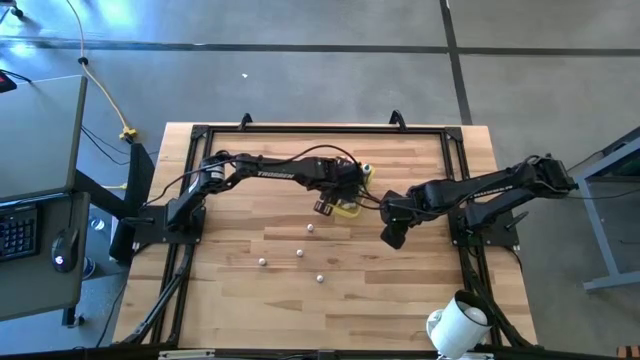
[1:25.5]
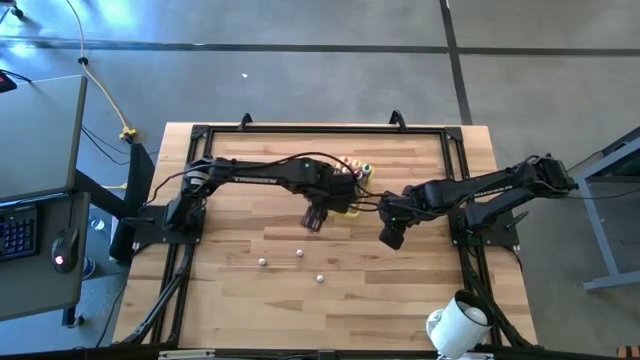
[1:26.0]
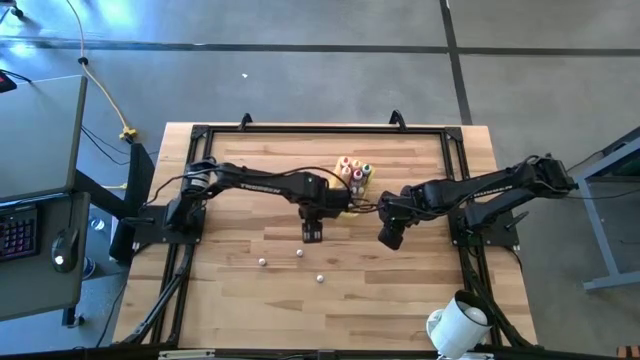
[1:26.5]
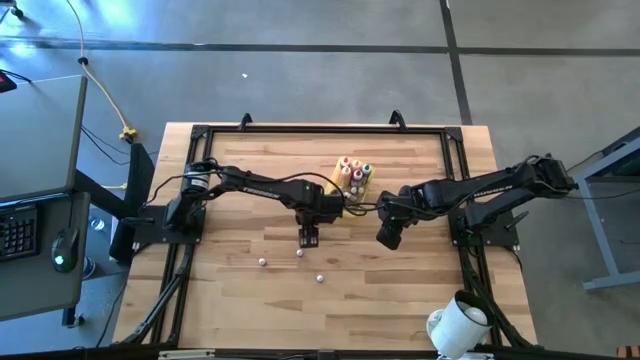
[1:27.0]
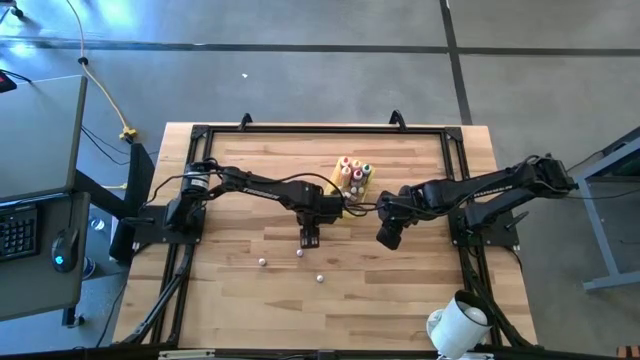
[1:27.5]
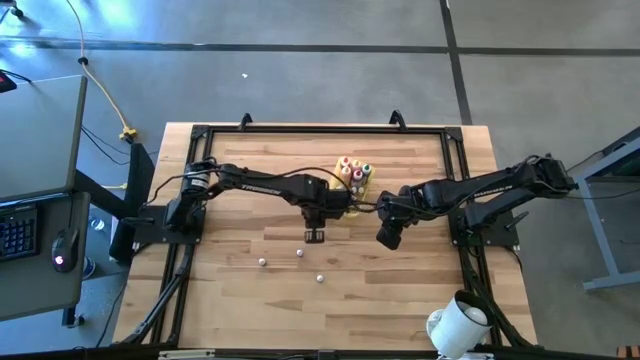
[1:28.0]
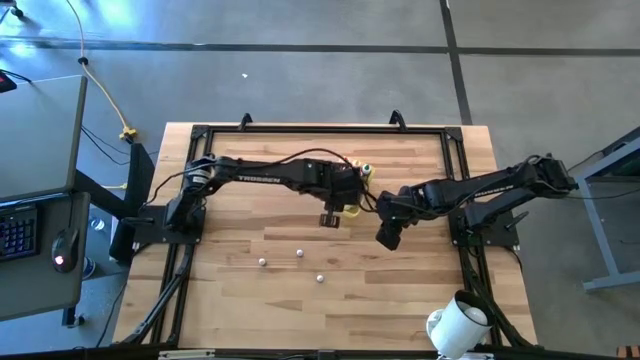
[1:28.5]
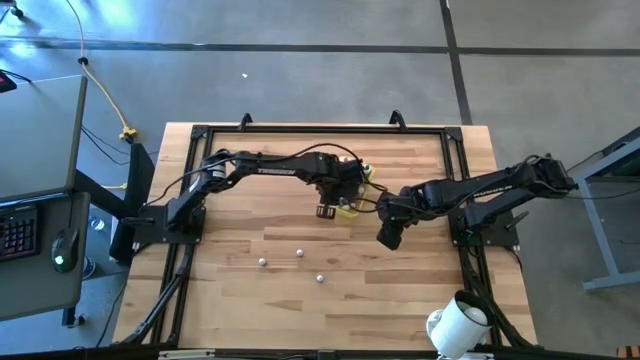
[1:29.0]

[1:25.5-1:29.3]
Task: Pick & Place food coloring
Put the small red food coloring bottle into the bin

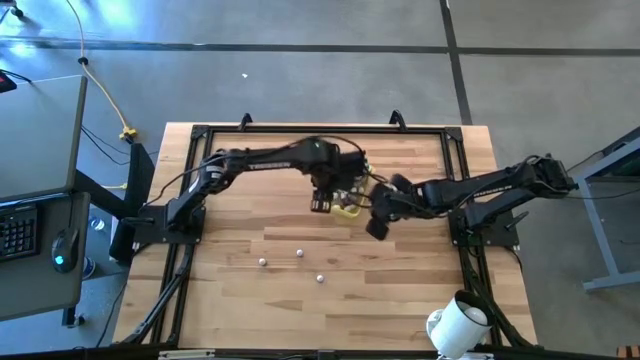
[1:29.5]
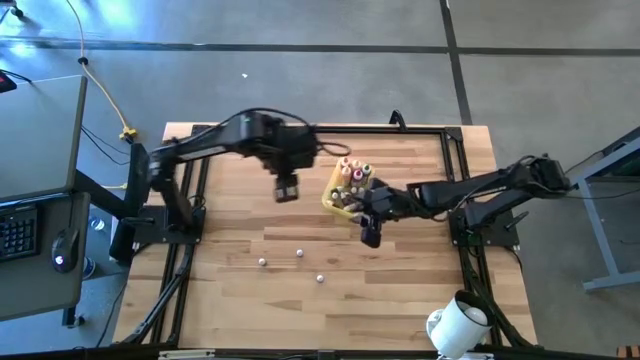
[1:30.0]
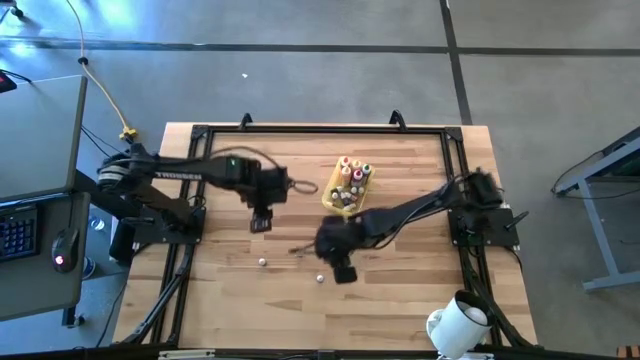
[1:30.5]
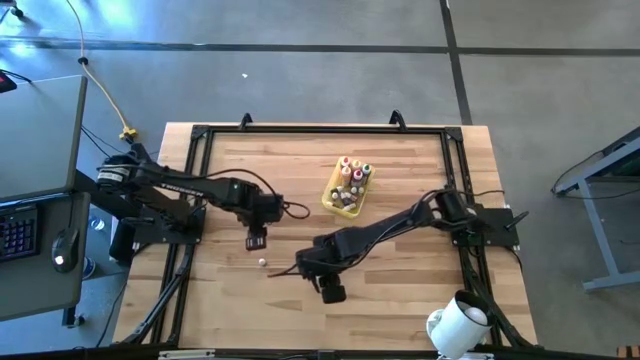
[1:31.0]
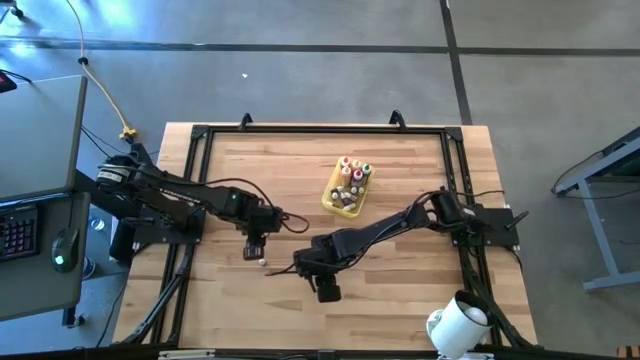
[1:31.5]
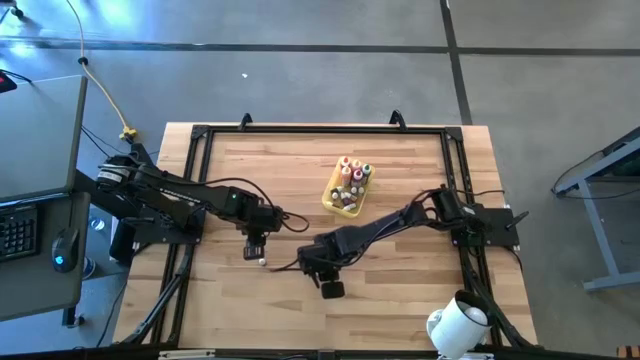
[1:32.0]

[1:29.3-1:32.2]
Put the small blue food coloring bottle into the bin

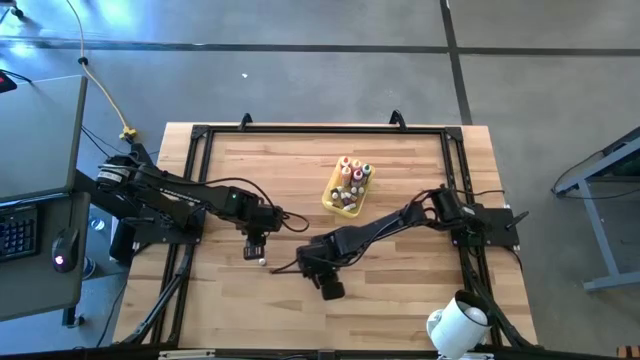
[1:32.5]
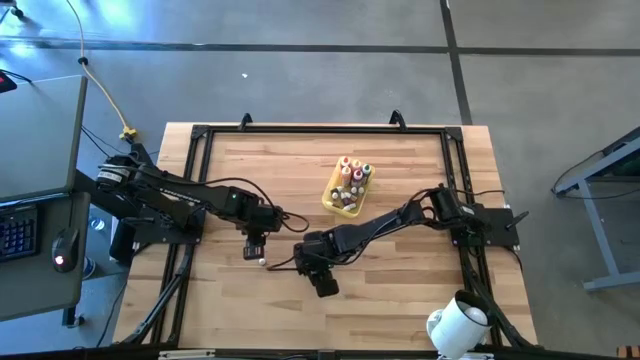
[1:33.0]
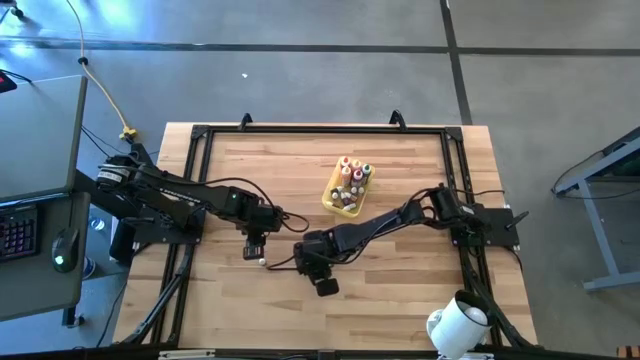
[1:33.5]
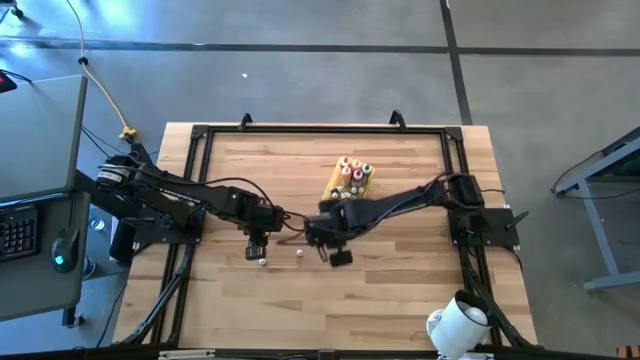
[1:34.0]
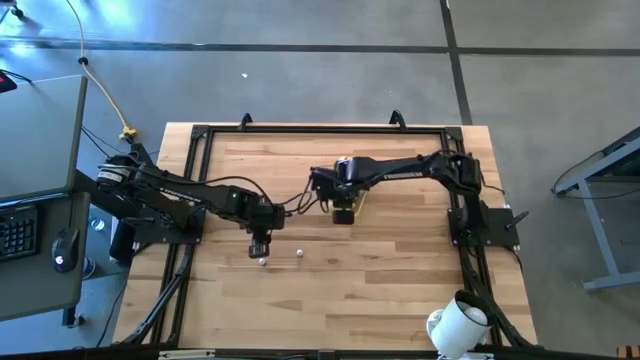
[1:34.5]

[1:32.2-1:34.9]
Put the small blue food coloring bottle into the bin

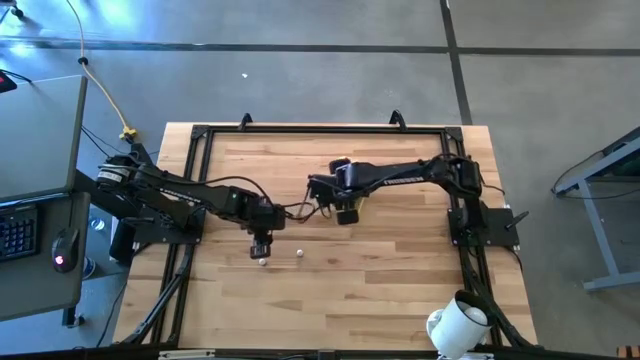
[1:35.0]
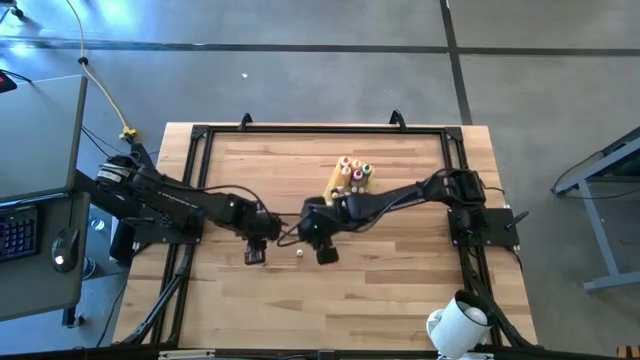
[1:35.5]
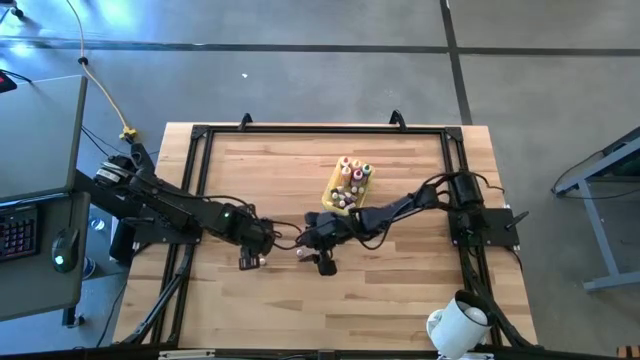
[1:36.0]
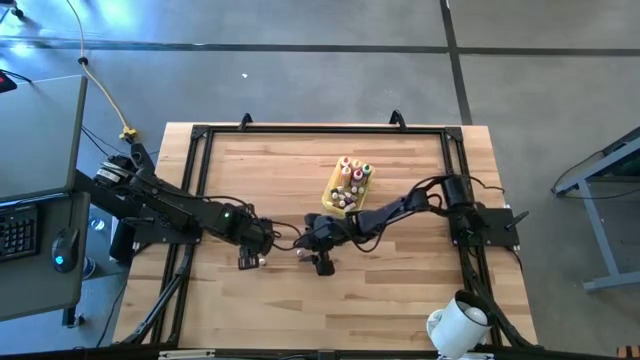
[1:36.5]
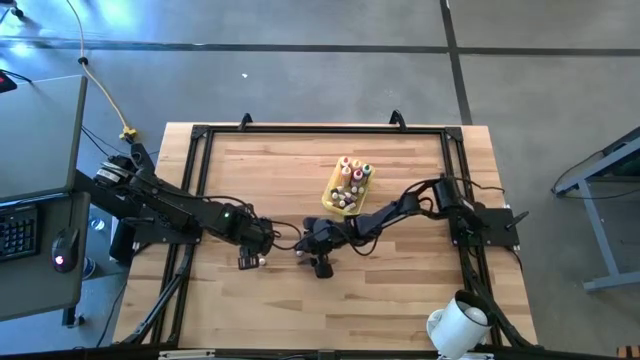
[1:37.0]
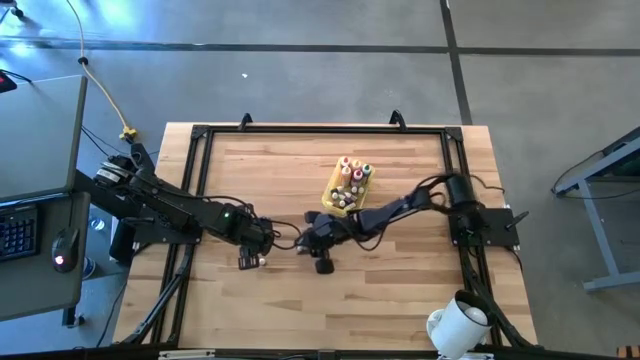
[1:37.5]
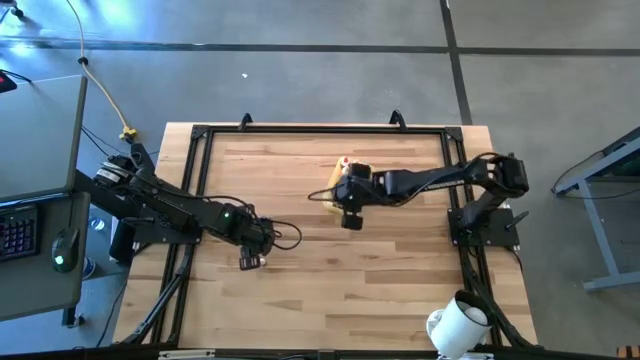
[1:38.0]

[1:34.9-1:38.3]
Put the small orange food coloring bottle into the bin

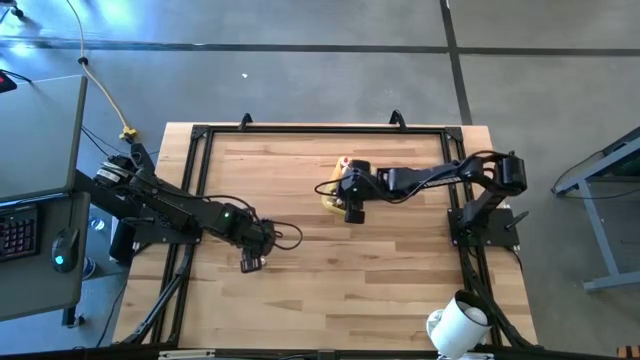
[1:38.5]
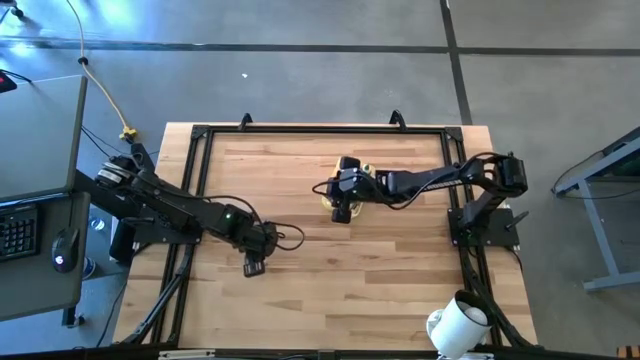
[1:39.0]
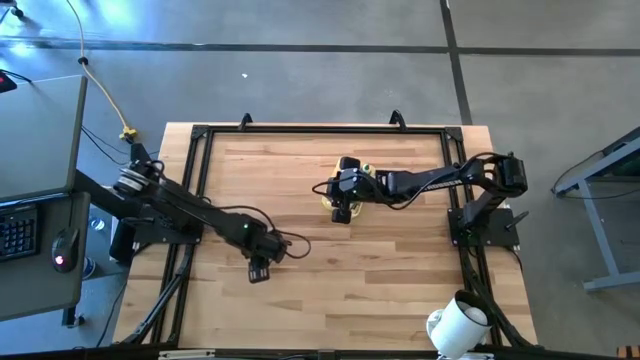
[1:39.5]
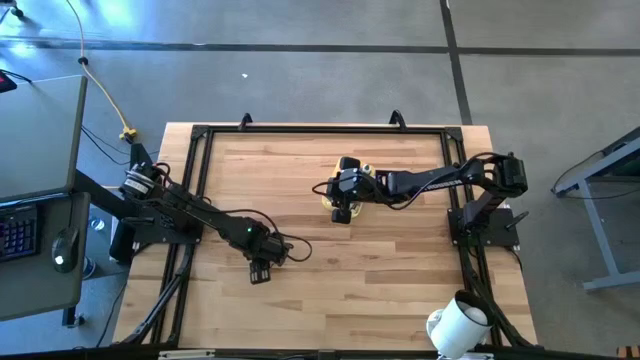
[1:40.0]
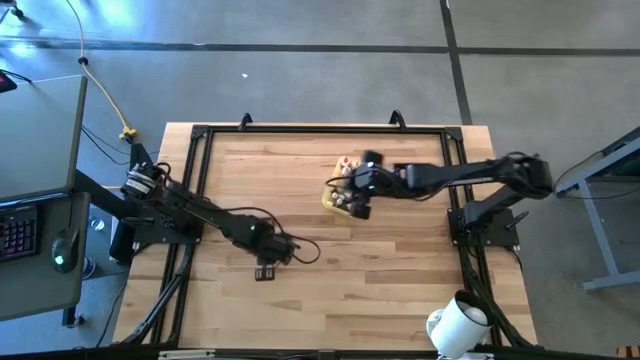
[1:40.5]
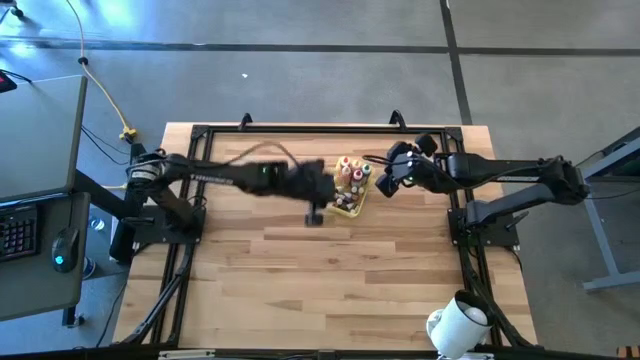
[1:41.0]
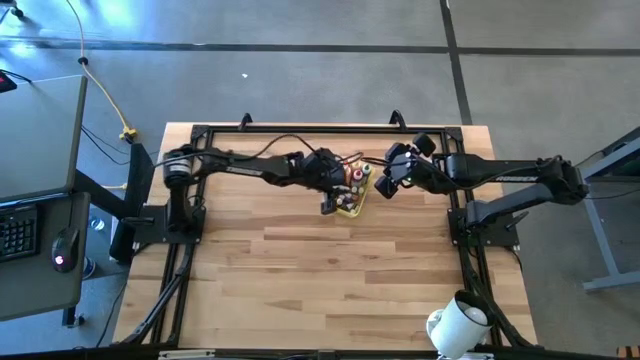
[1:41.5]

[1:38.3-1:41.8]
Put the small blue food coloring bottle into the bin

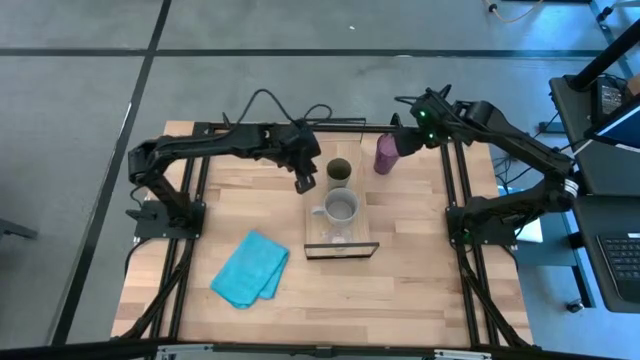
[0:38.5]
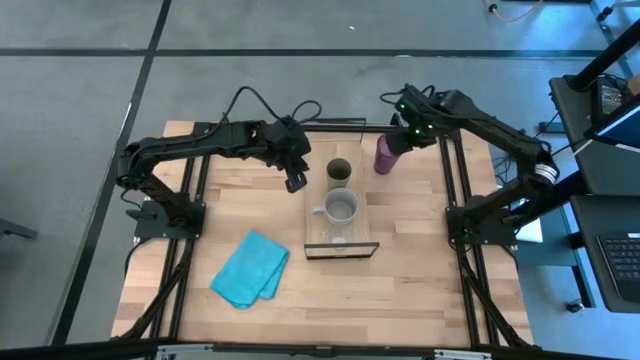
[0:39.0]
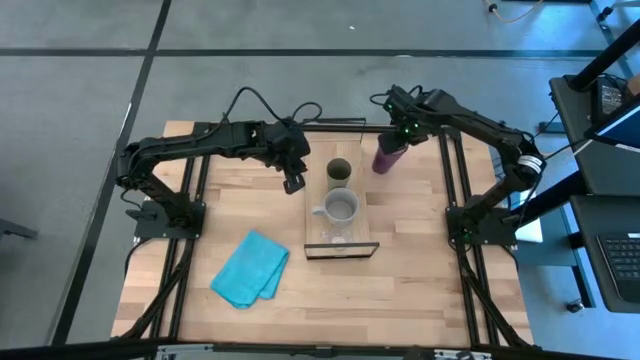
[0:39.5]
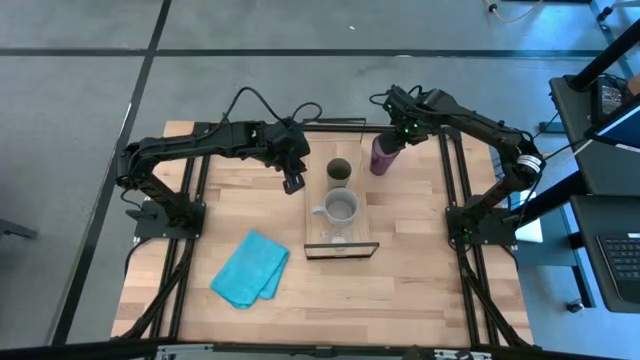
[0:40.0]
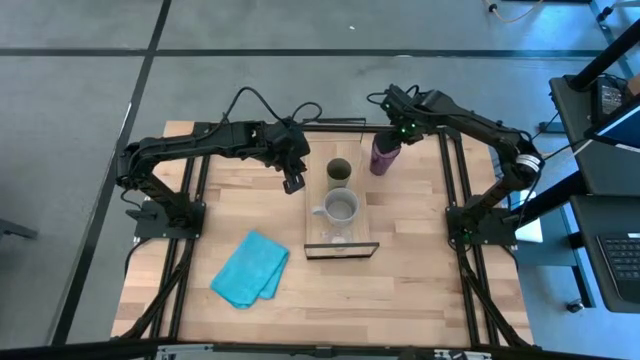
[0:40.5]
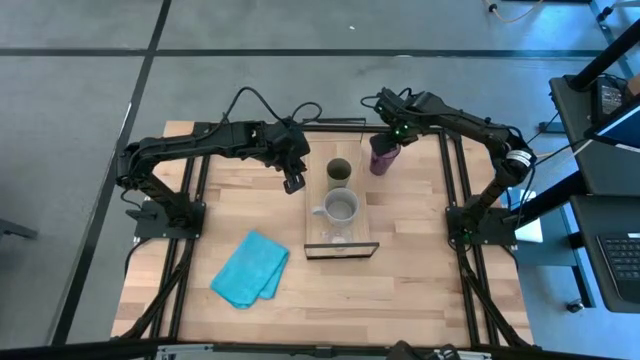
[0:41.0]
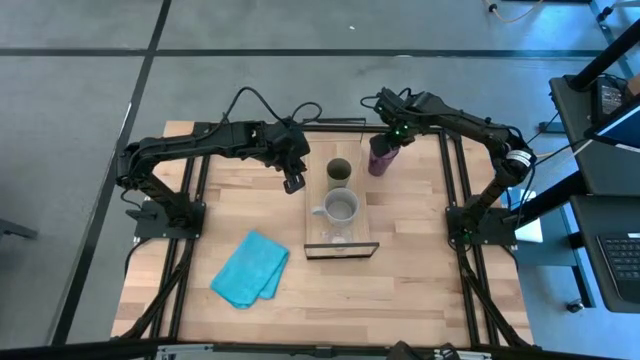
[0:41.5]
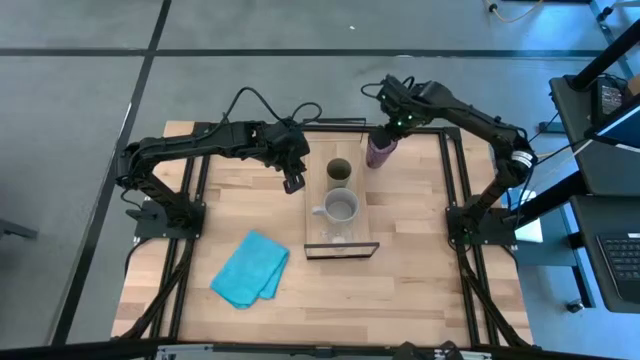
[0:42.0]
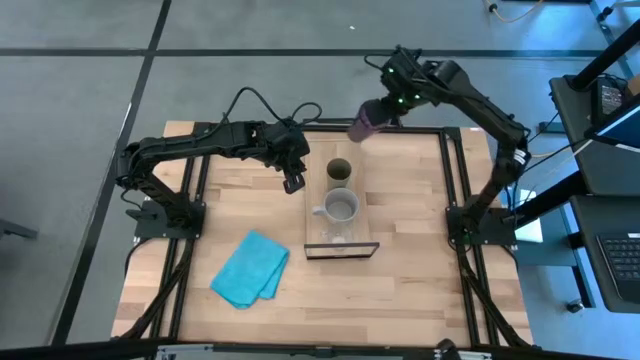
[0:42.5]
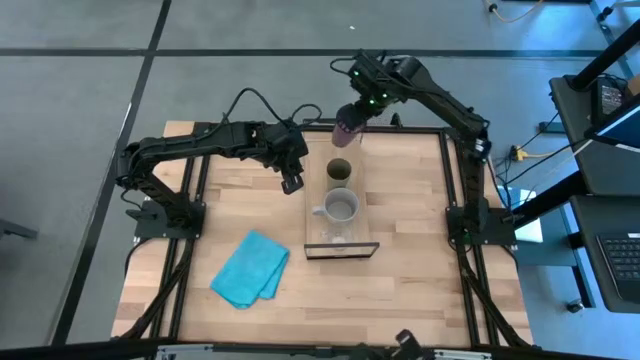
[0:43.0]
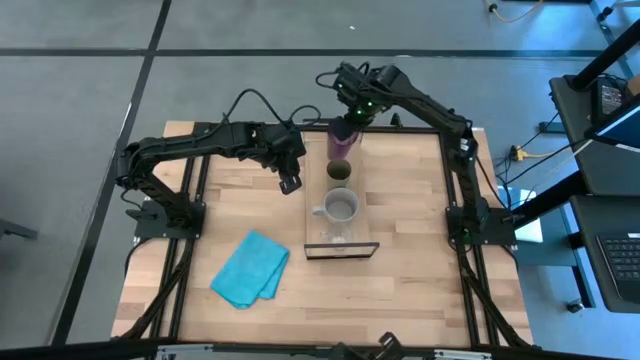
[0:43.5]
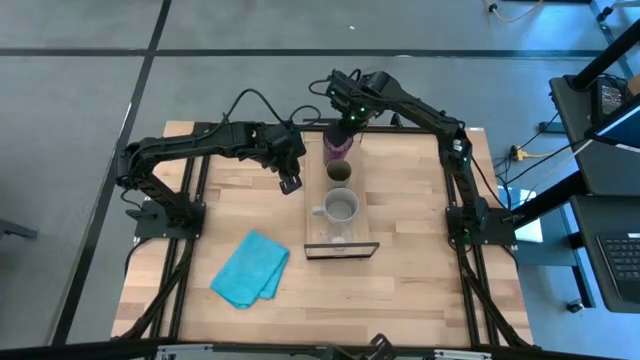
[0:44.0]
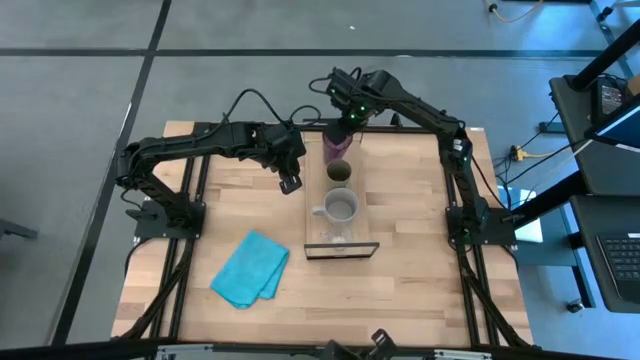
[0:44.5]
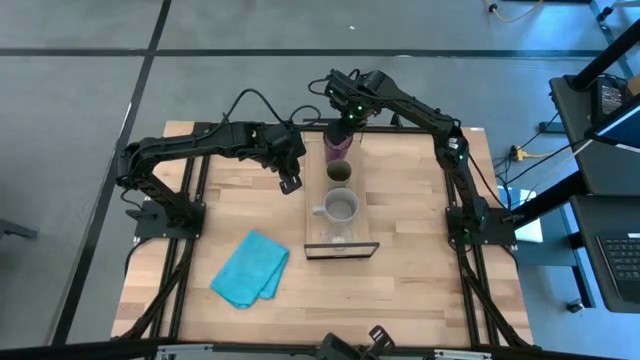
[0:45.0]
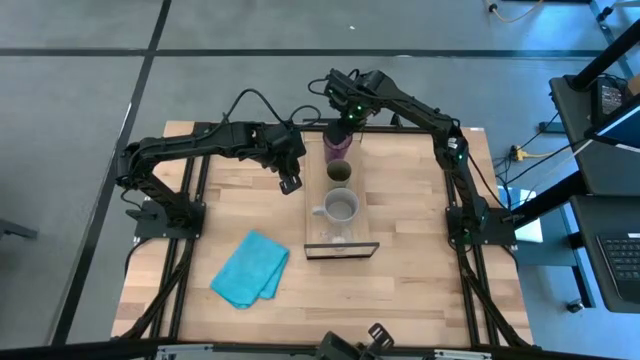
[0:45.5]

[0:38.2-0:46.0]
Task: Stack small to large cups/mugs on shelf
Put the purple cup on the shelf
